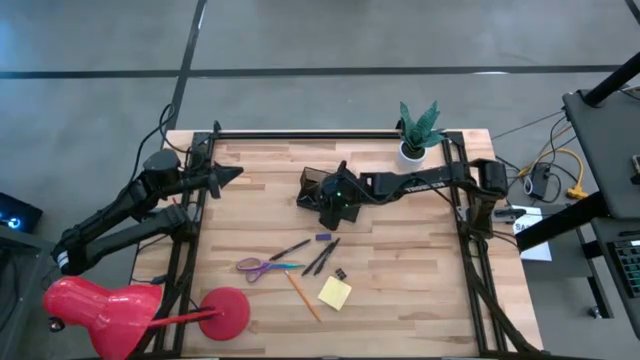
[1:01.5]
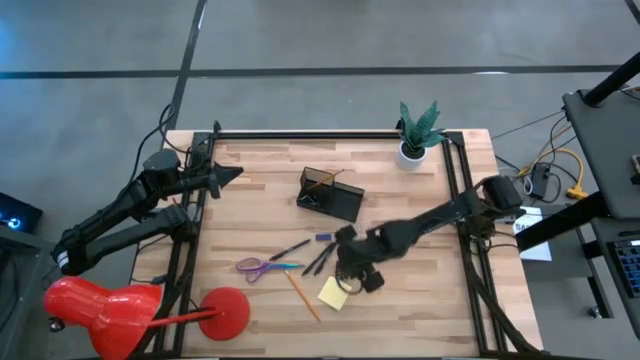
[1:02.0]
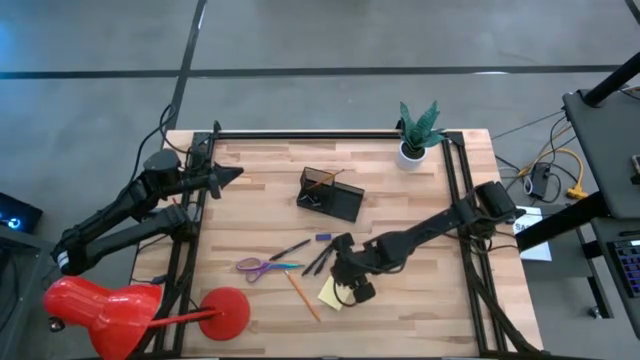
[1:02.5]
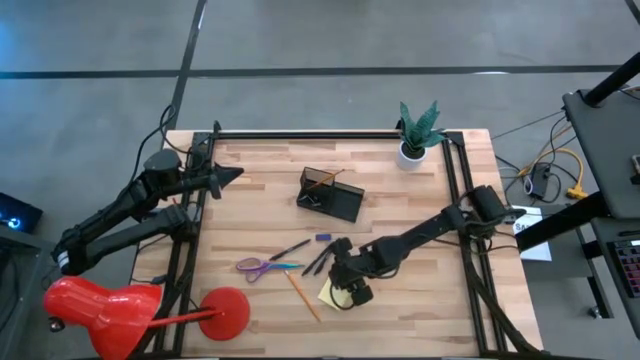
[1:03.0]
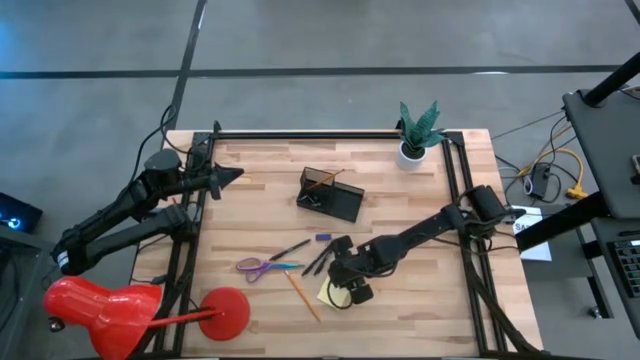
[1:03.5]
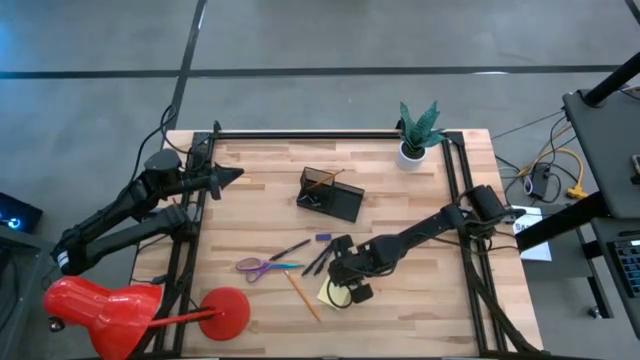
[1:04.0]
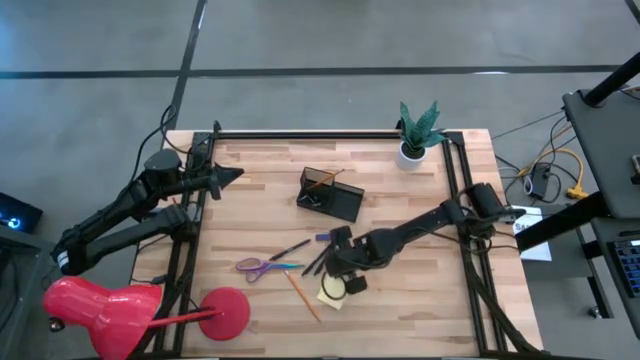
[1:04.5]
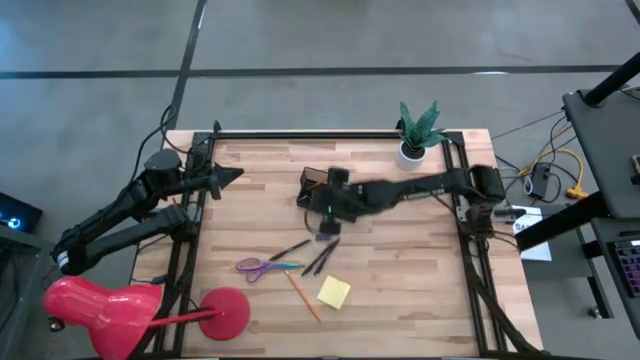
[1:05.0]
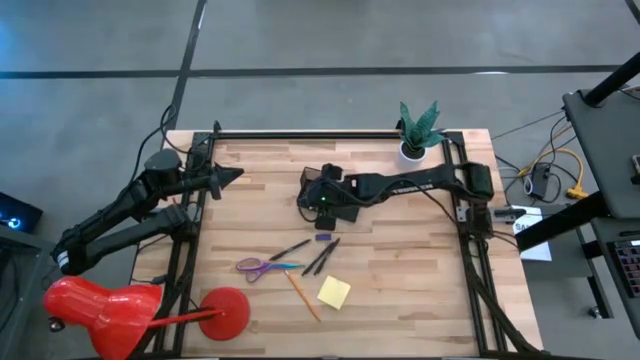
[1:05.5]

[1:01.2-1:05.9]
Task: Pick and place office supplies into organizer
Put the binder clip into the desk organizer

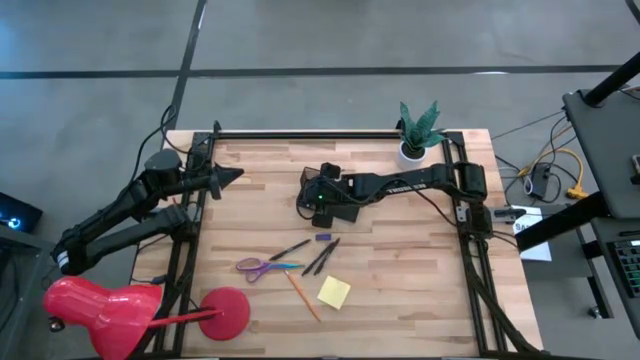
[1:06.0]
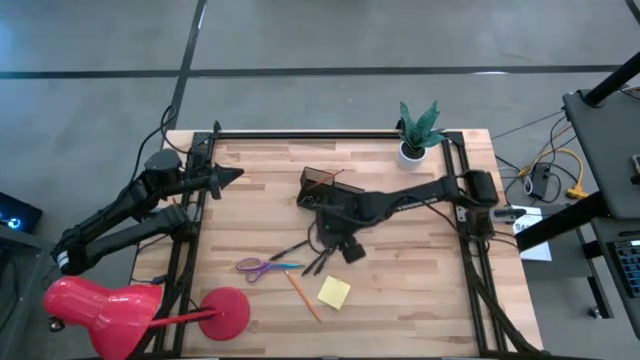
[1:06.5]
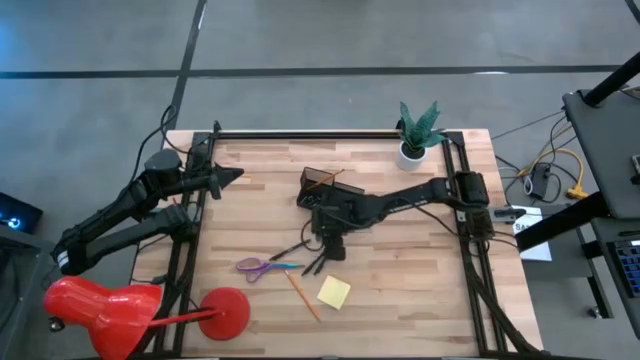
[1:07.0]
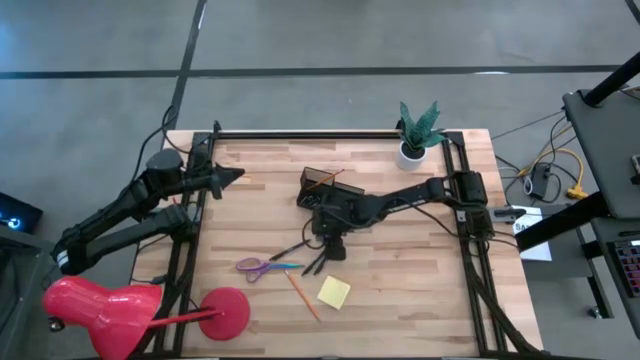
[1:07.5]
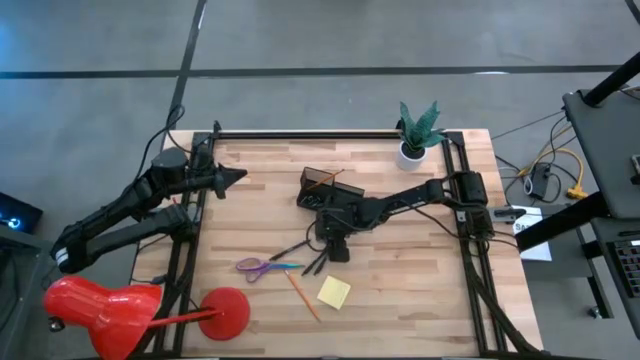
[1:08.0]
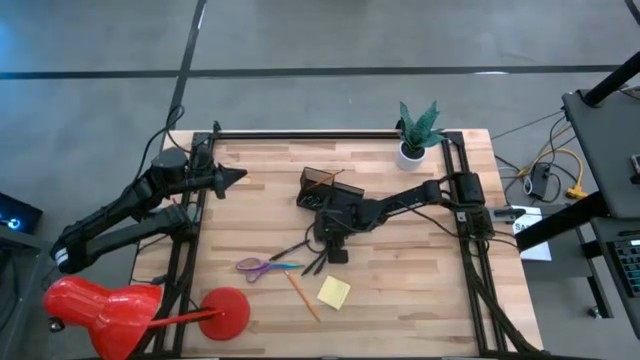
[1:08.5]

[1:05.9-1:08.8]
Put the blue eraser into the desk organizer

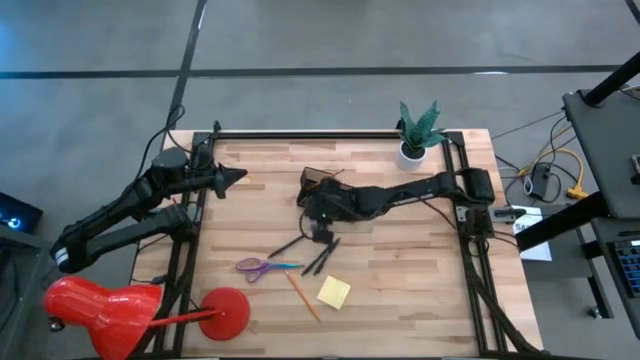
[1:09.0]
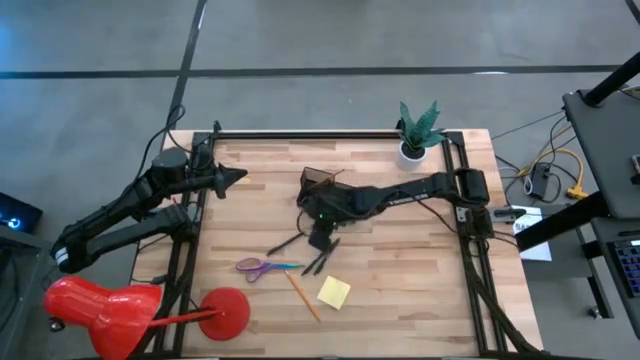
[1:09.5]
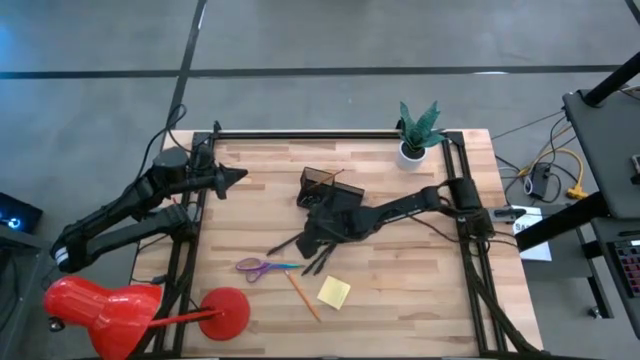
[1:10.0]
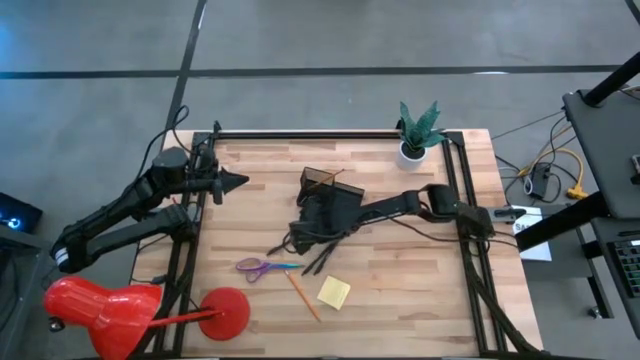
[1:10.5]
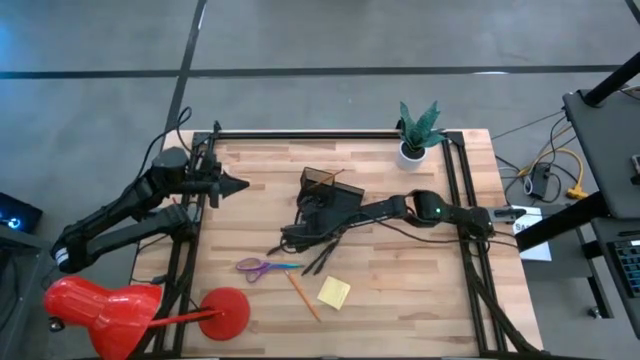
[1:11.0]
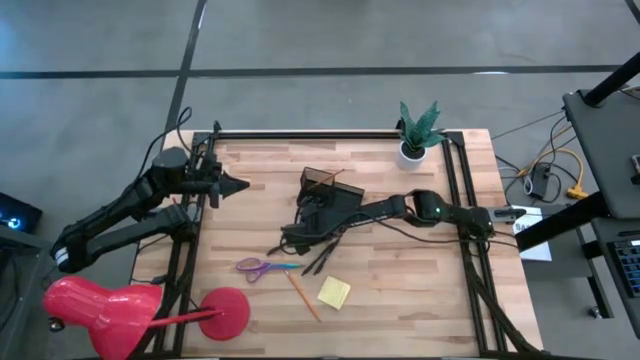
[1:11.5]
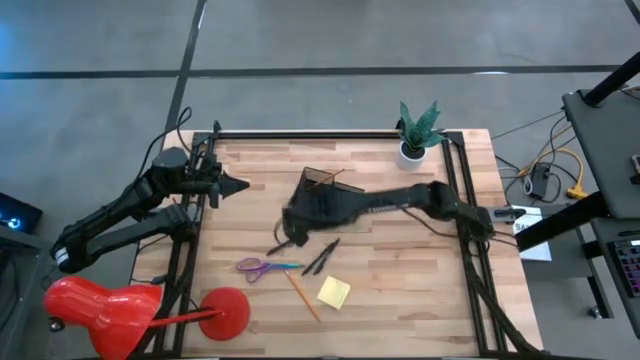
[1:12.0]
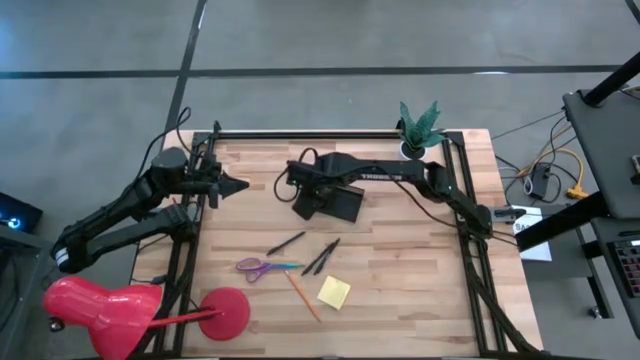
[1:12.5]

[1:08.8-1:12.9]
Put the blue eraser into the desk organizer

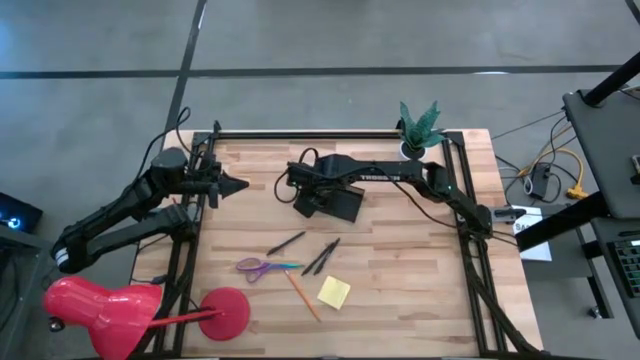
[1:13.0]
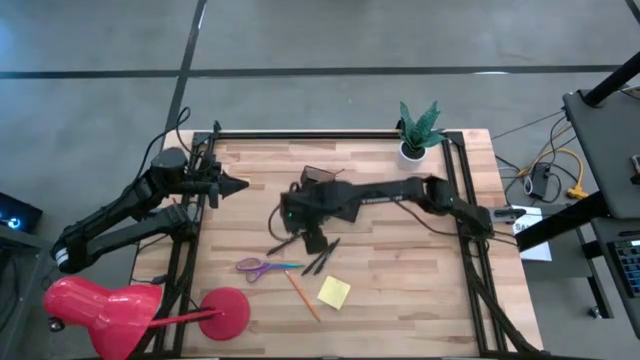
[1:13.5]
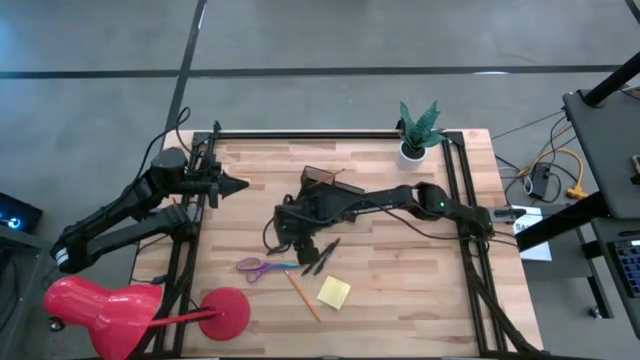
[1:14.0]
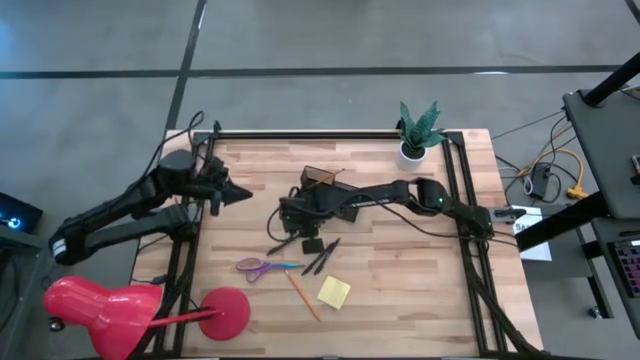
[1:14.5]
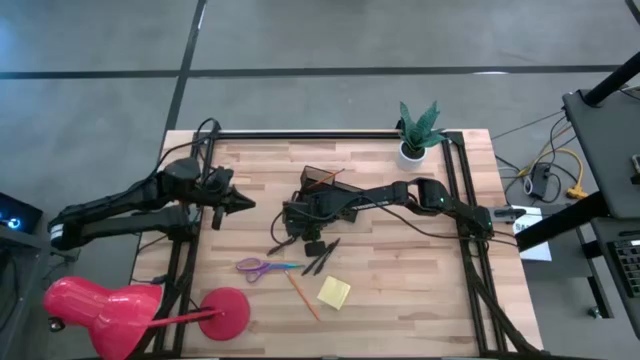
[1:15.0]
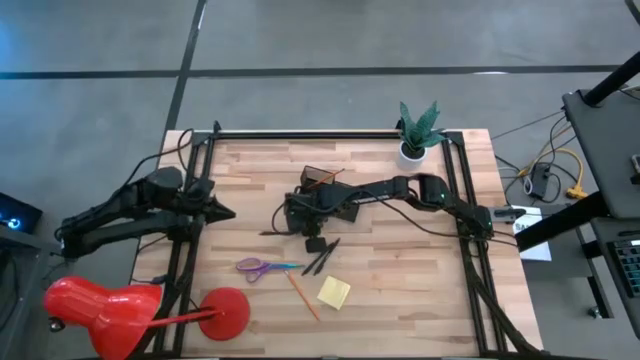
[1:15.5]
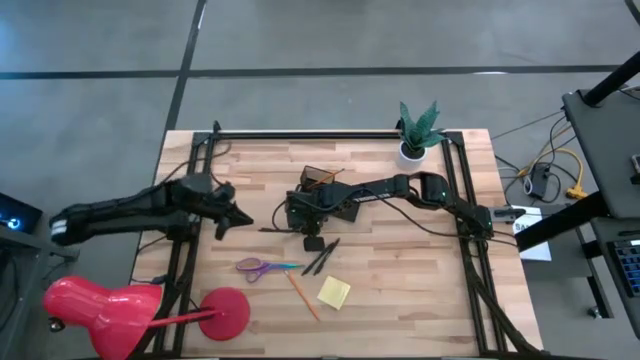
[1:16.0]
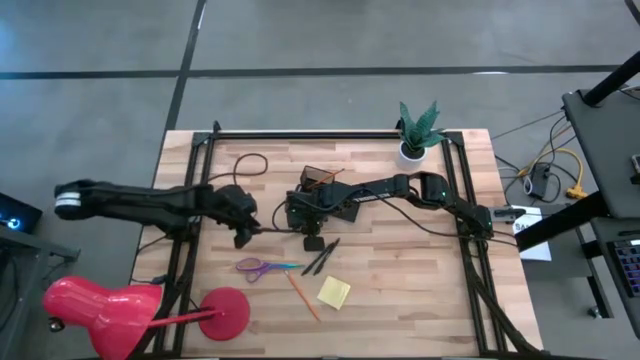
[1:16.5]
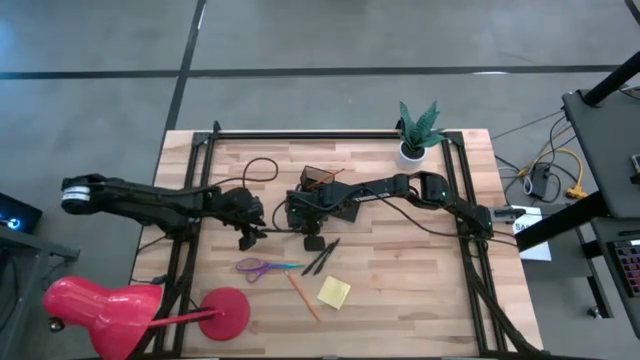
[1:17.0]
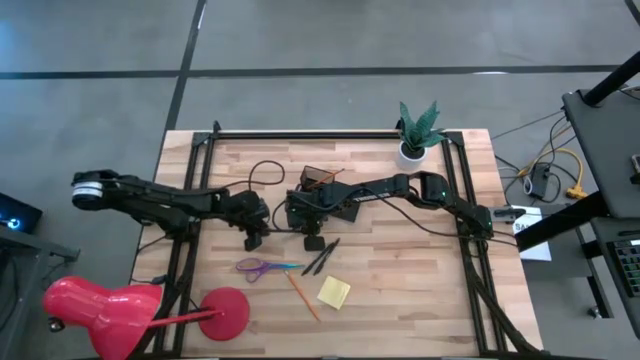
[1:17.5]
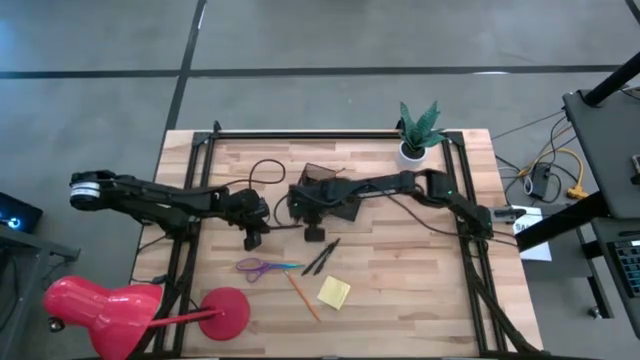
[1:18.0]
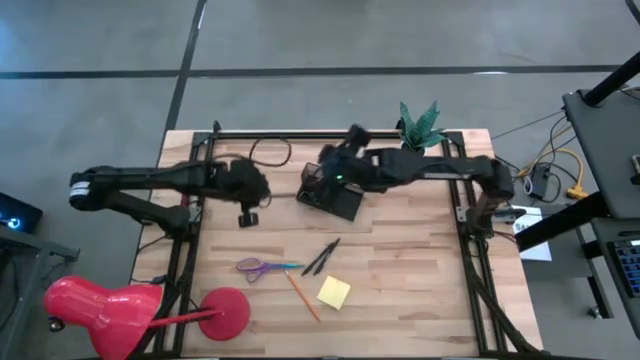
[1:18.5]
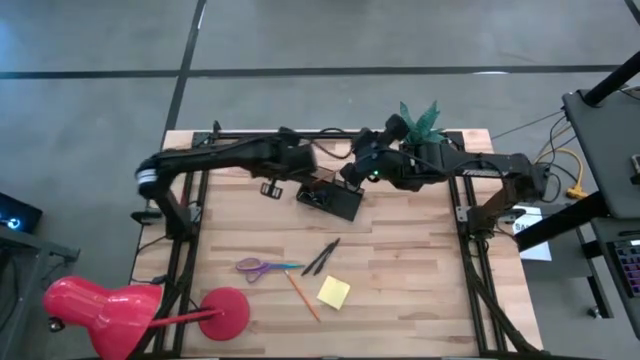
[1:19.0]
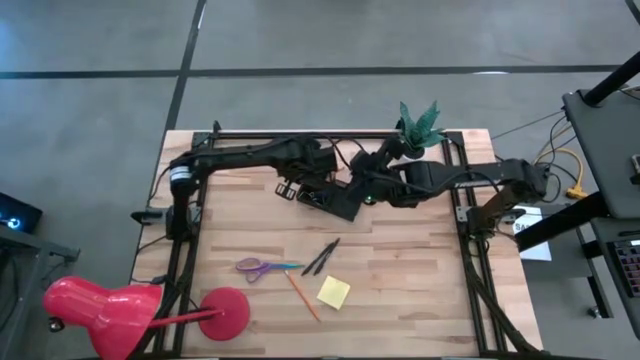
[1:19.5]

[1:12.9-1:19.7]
Put the left pen into the desk organizer
